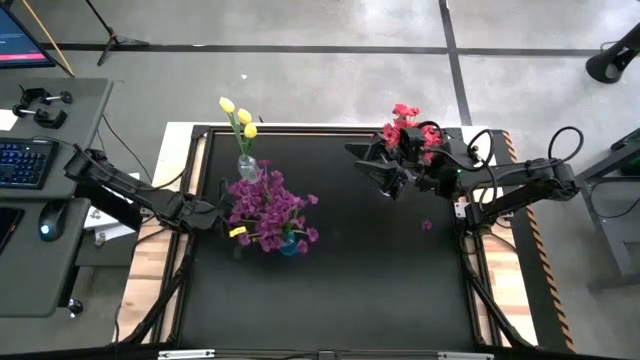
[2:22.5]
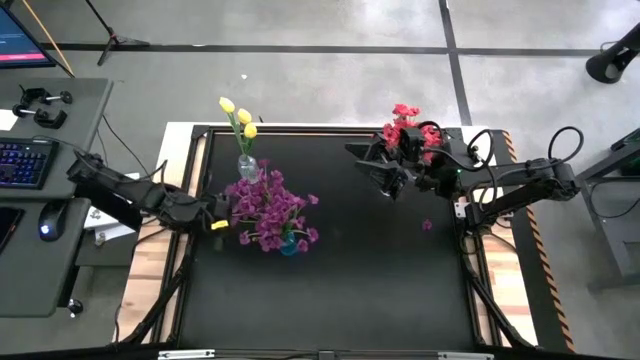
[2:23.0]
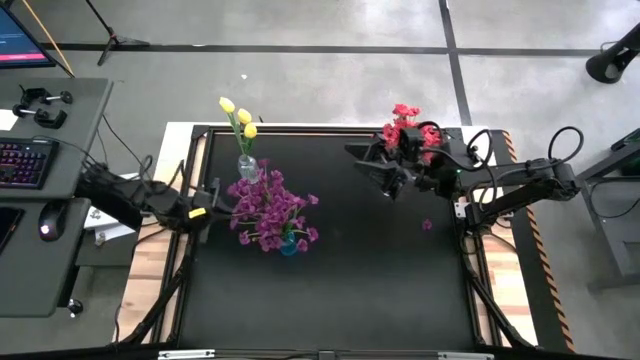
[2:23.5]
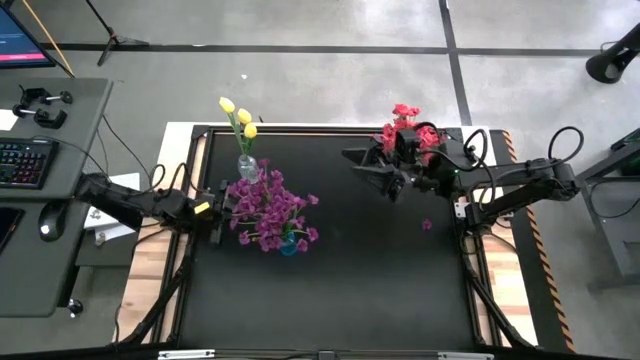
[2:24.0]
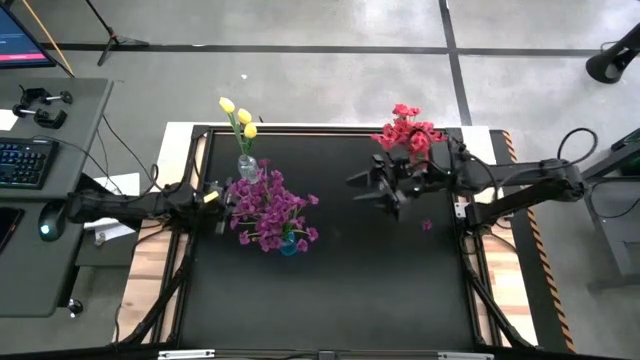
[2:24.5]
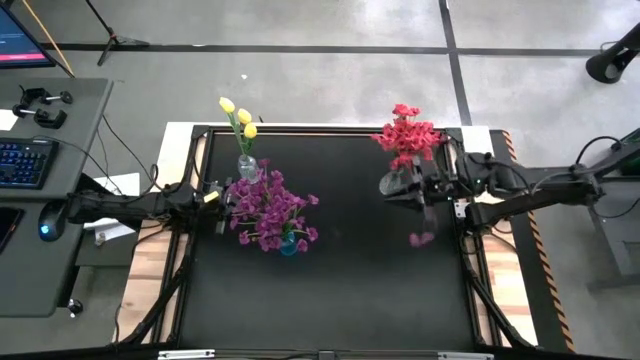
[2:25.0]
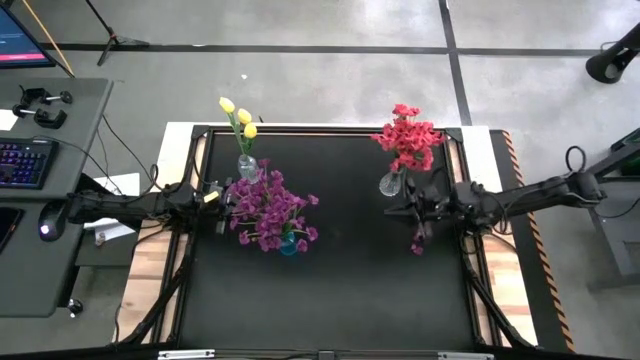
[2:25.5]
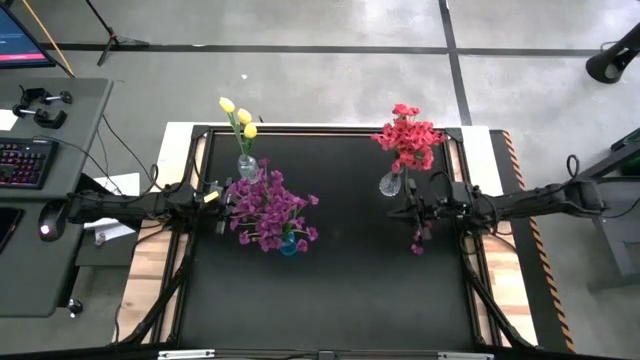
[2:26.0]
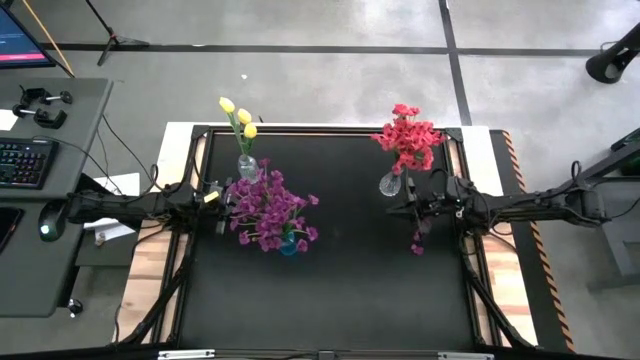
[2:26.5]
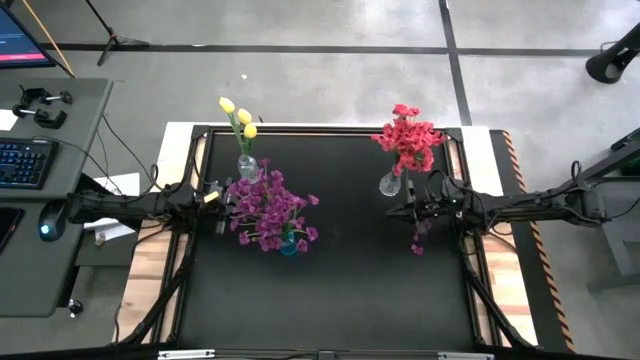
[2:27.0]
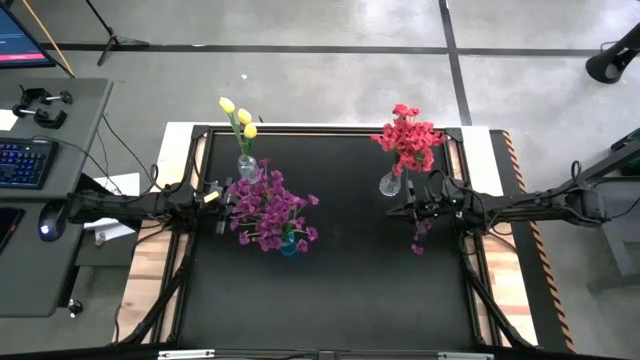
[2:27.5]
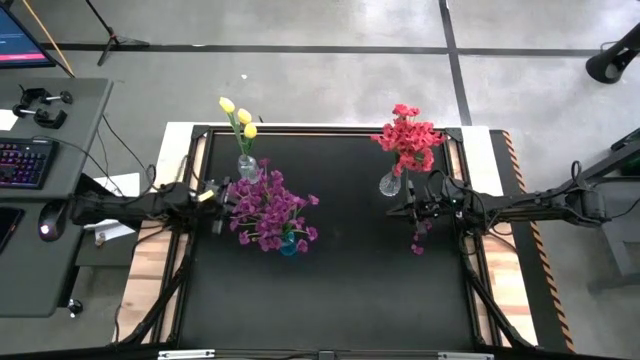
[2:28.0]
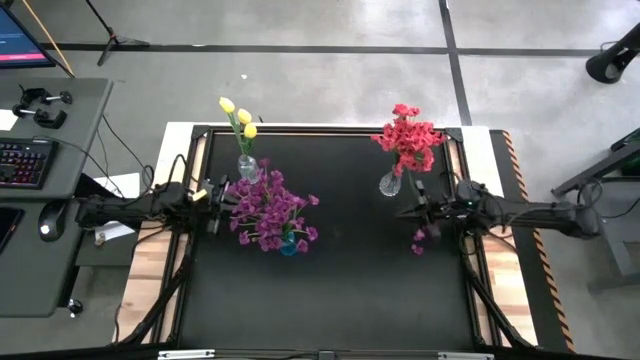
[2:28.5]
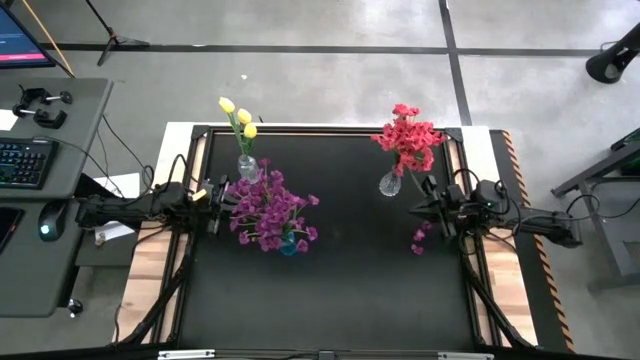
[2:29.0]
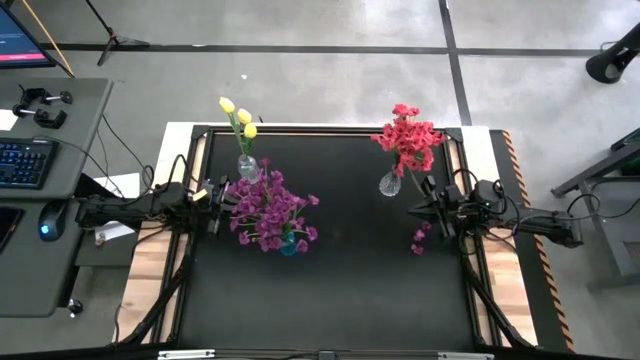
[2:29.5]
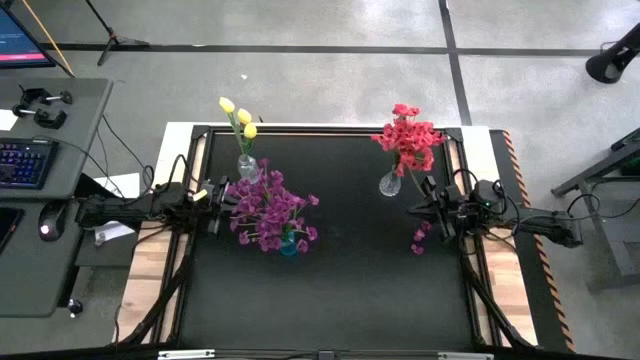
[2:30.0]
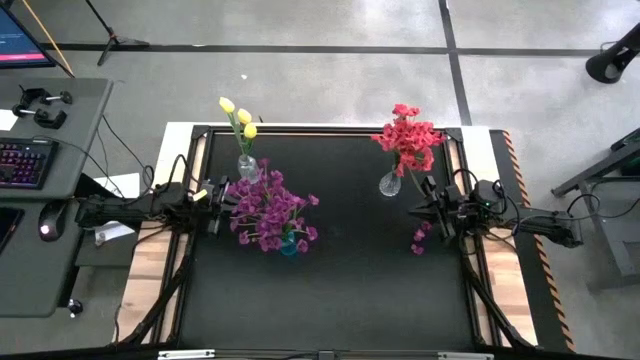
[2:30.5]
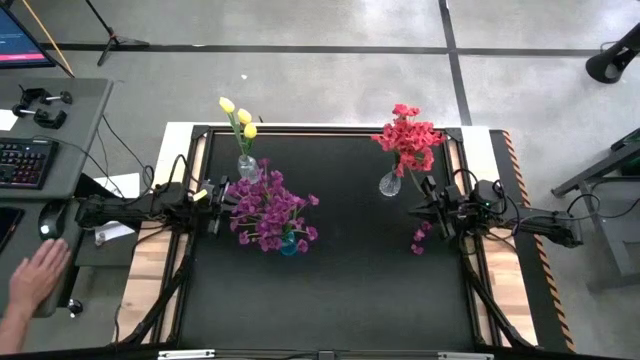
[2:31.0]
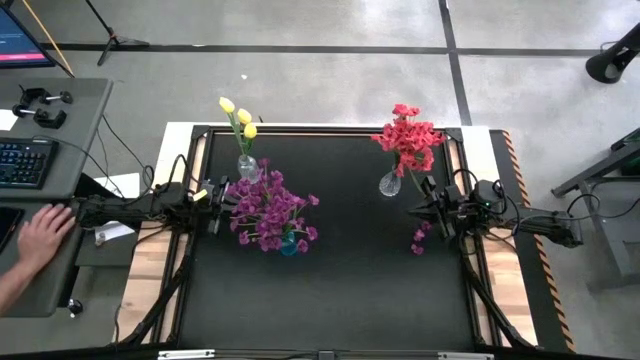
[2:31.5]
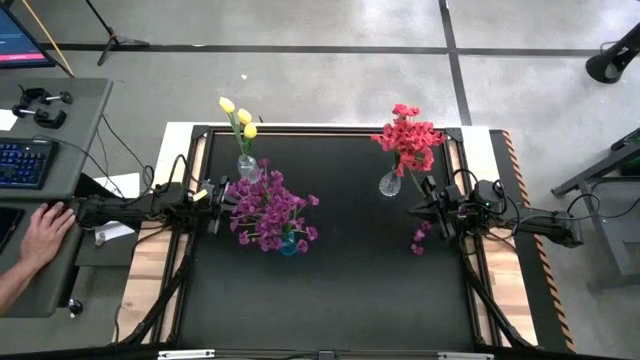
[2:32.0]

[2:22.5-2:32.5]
Task: Sort flowers into vase by color
Return to Home Position

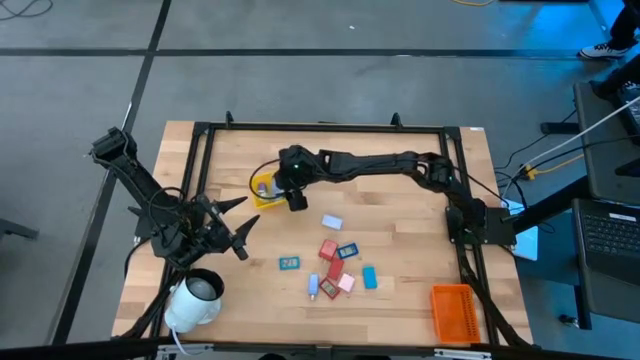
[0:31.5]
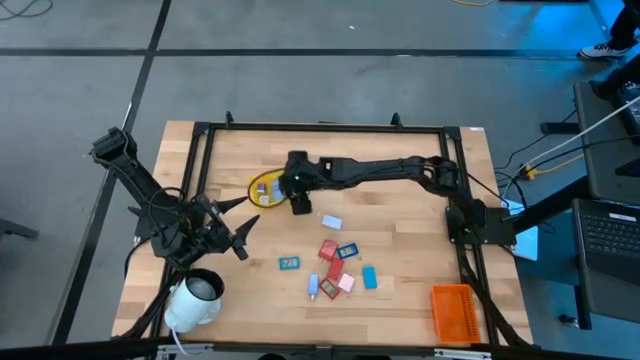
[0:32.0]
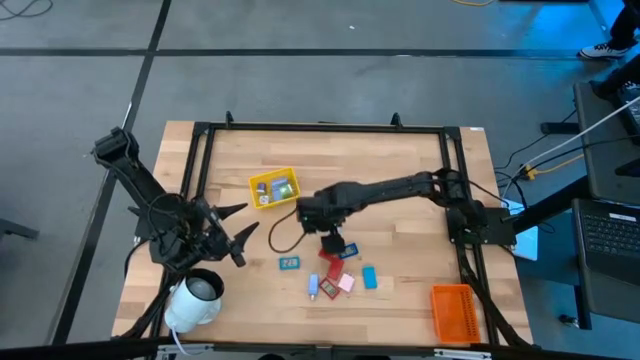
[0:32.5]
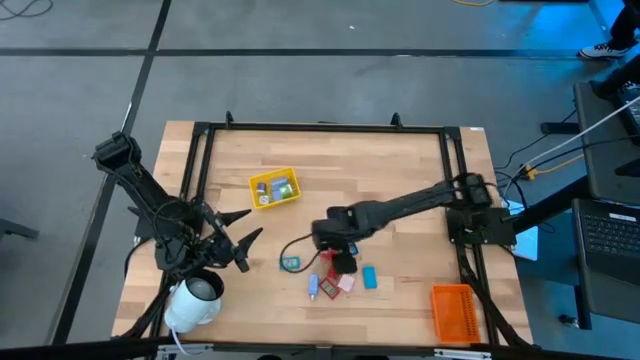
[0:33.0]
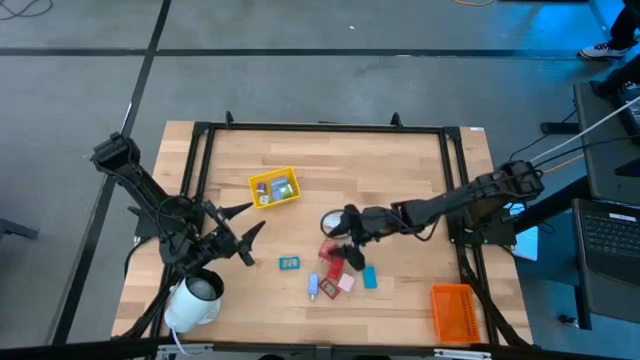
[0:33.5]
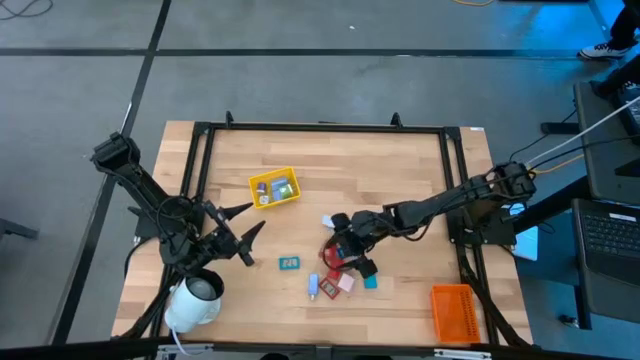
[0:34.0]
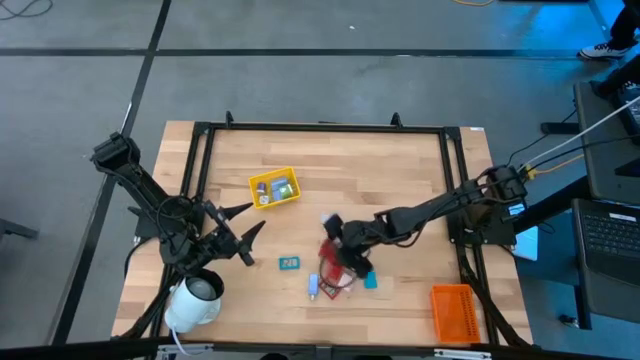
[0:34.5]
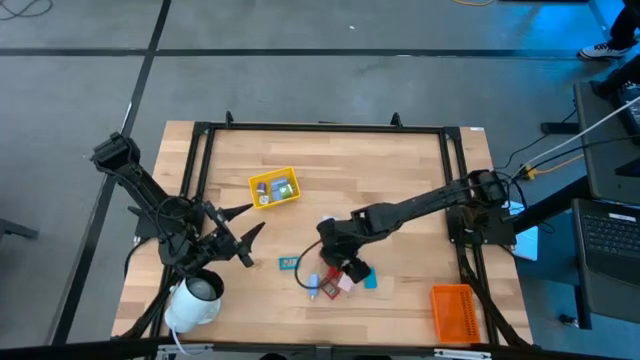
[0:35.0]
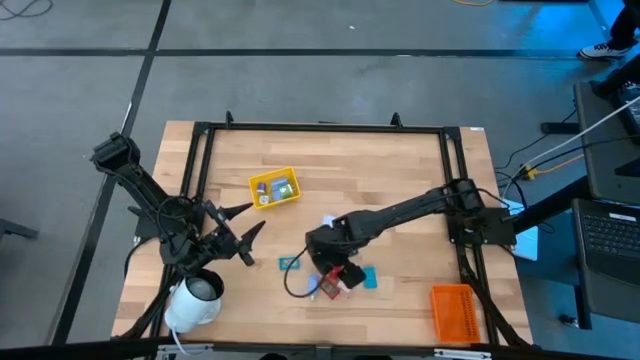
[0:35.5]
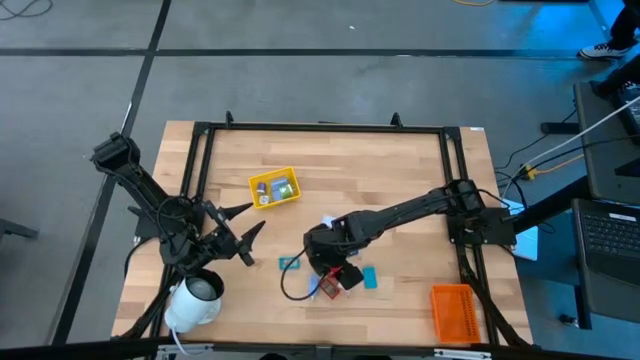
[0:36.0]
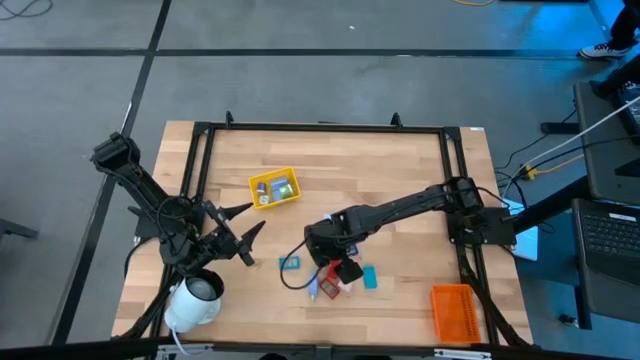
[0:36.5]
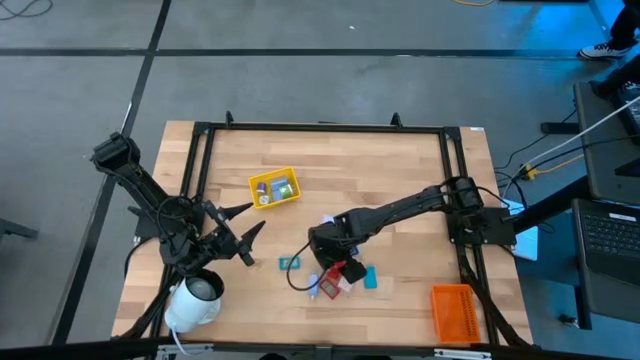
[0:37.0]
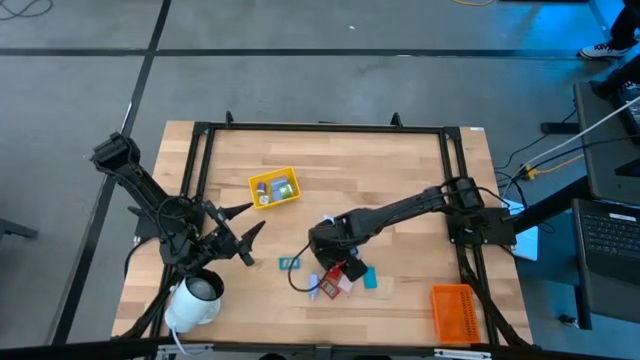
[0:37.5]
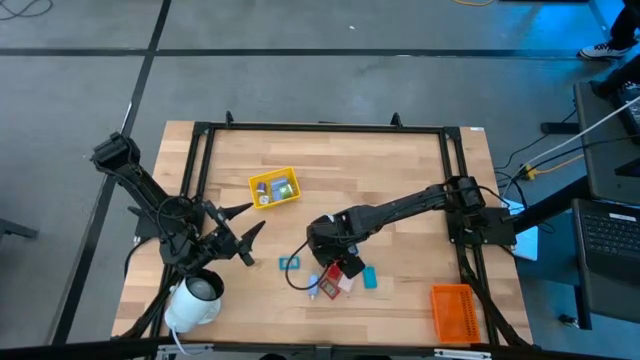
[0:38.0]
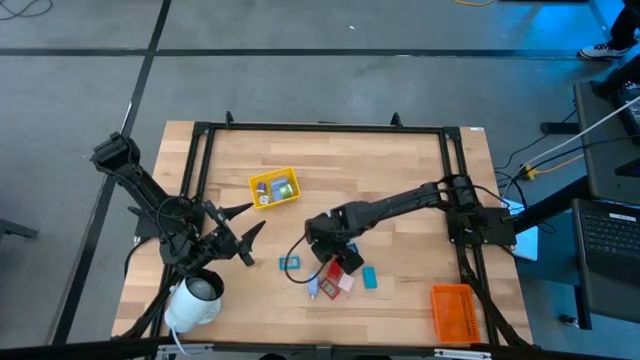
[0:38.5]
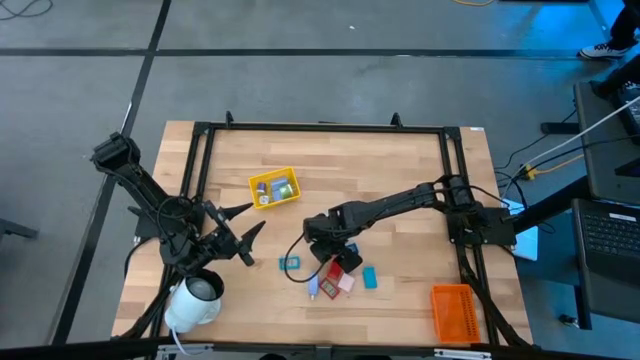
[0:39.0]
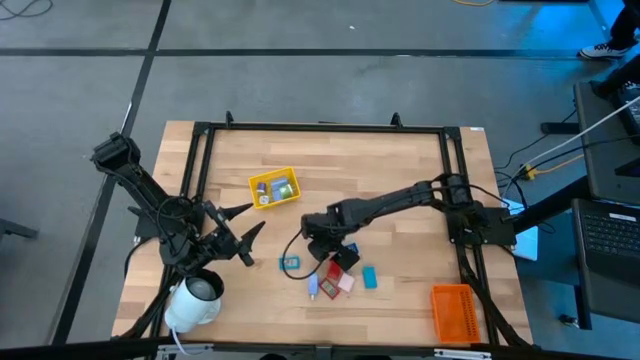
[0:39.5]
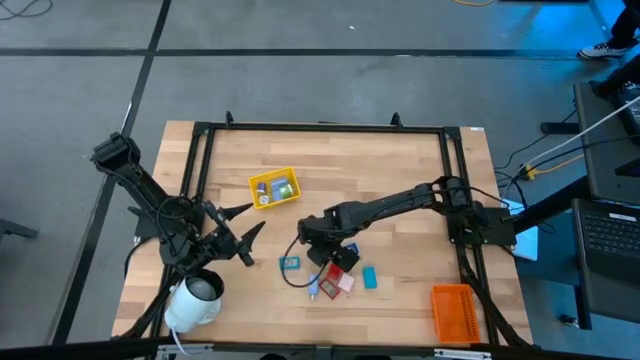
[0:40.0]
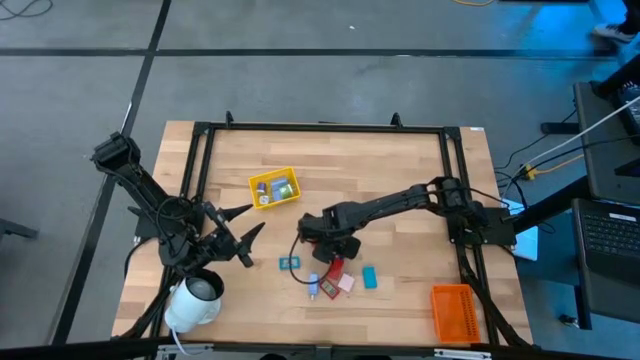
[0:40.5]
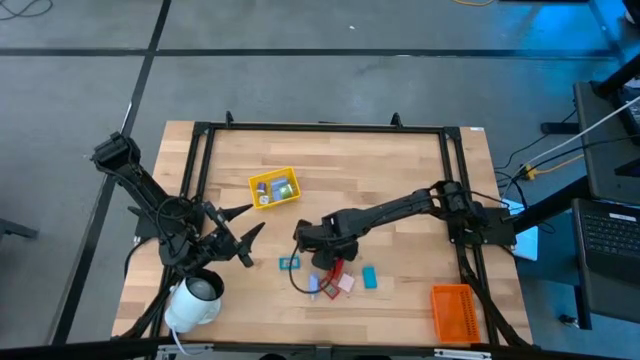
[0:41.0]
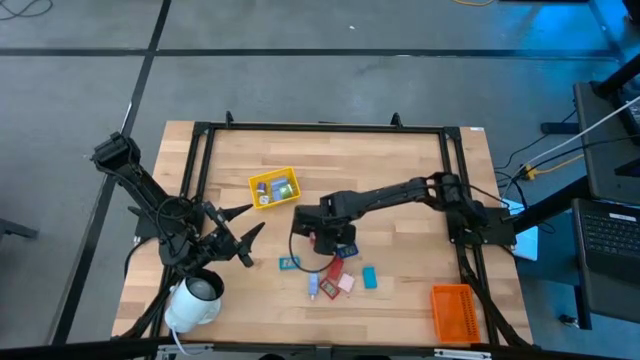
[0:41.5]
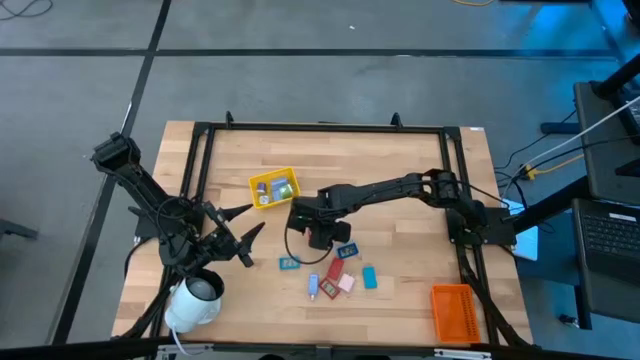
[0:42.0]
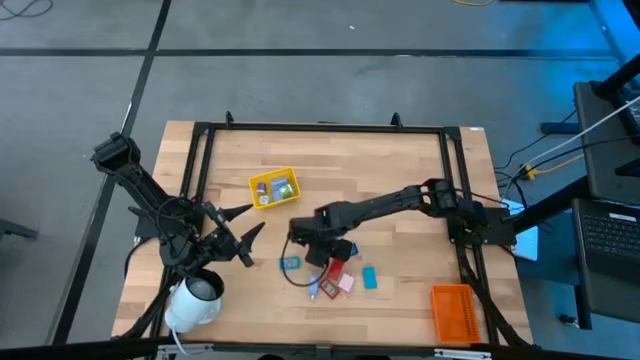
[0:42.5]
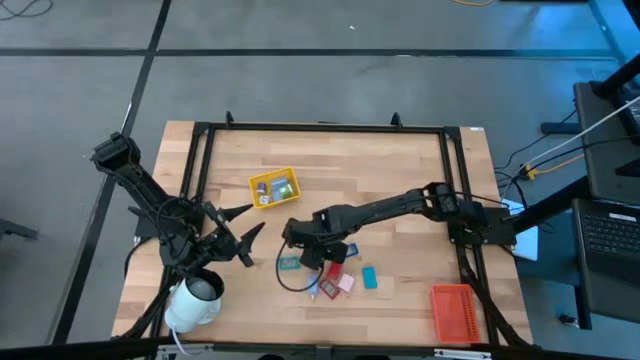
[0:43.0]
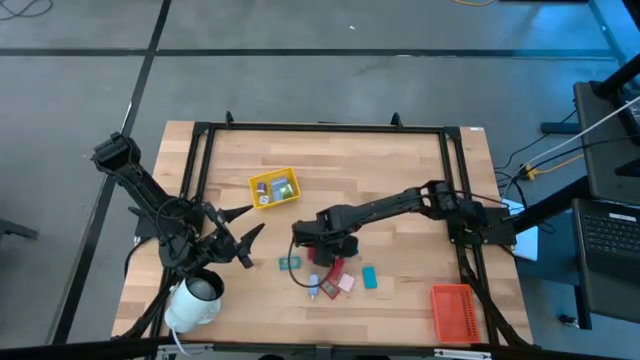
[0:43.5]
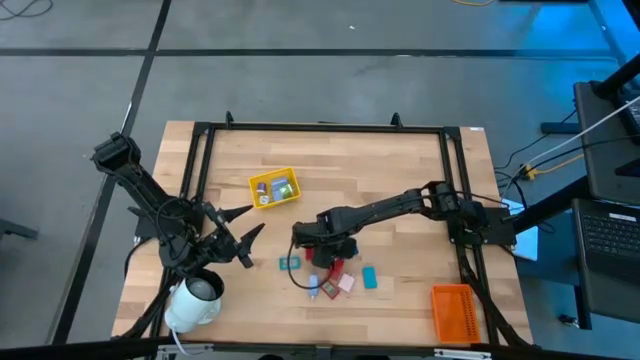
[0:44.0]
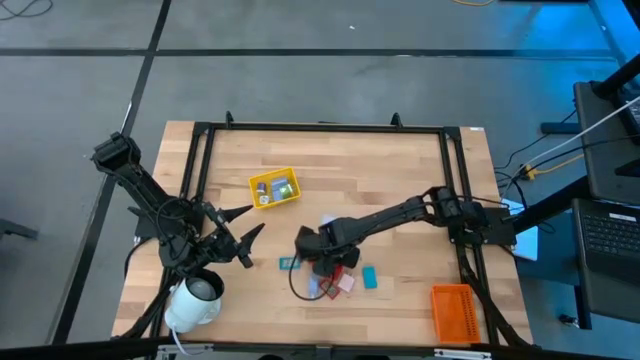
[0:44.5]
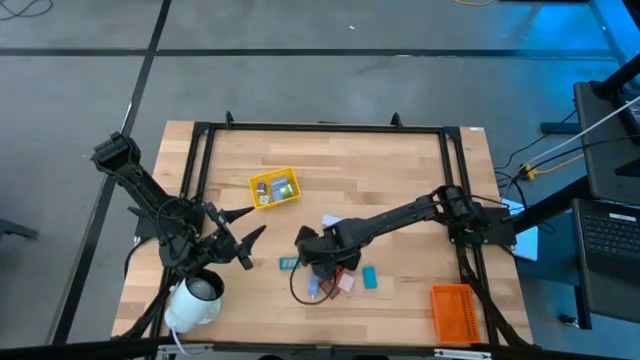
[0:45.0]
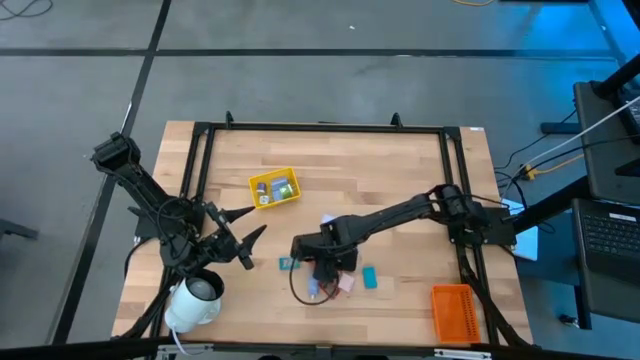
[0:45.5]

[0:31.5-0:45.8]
Task: Pick & Place Office items
Put the red charger adapter into the yellow bin
